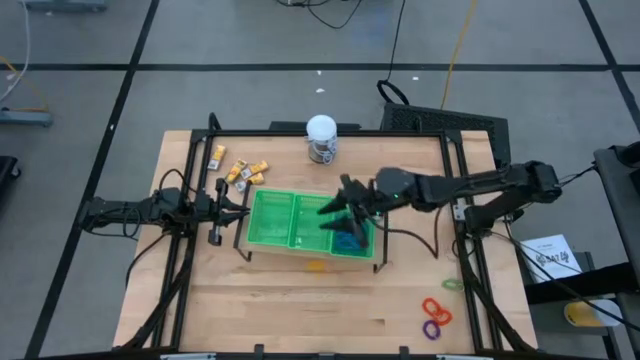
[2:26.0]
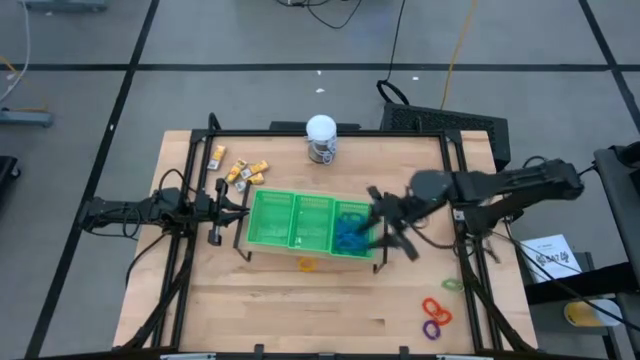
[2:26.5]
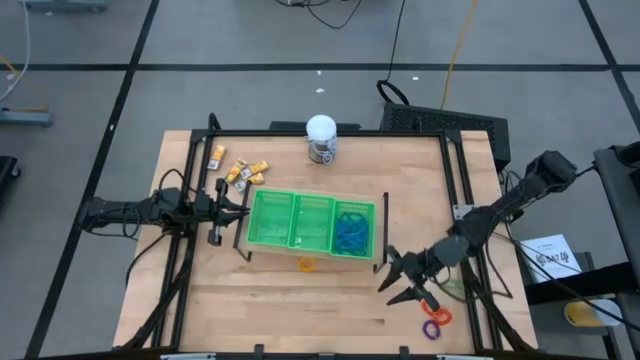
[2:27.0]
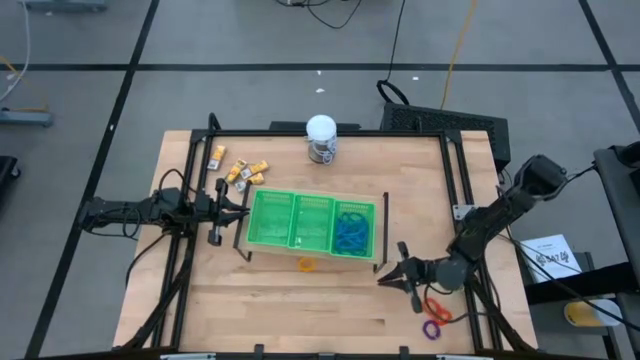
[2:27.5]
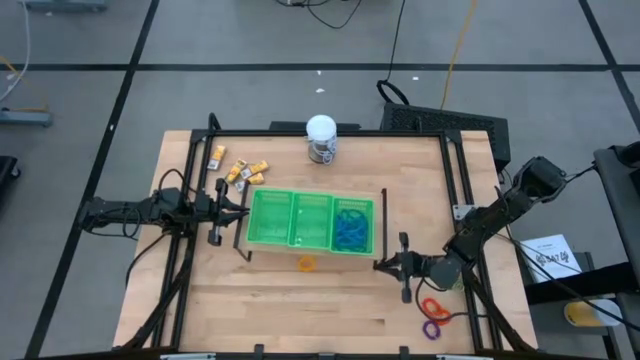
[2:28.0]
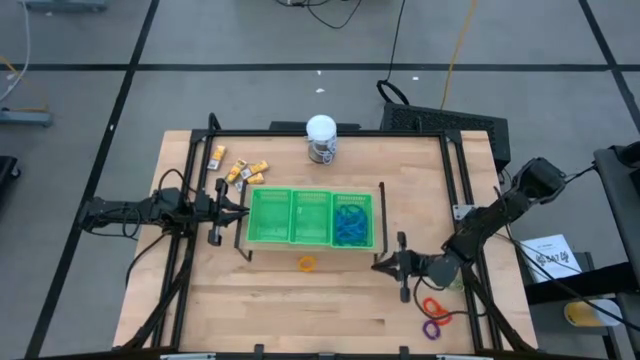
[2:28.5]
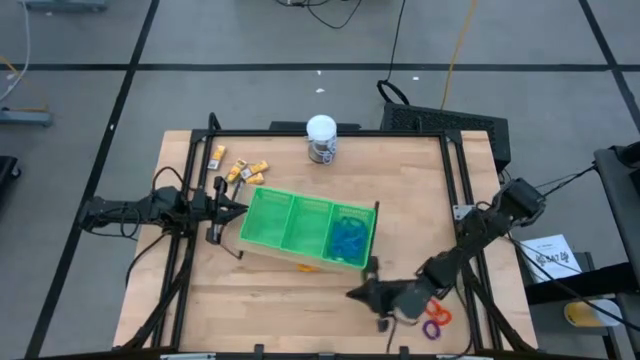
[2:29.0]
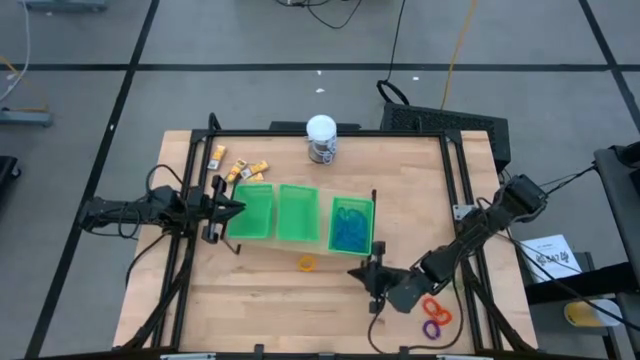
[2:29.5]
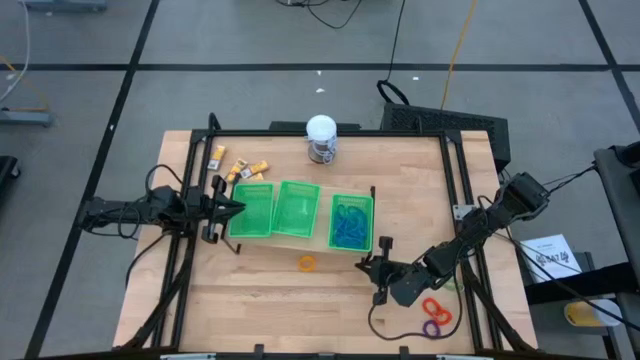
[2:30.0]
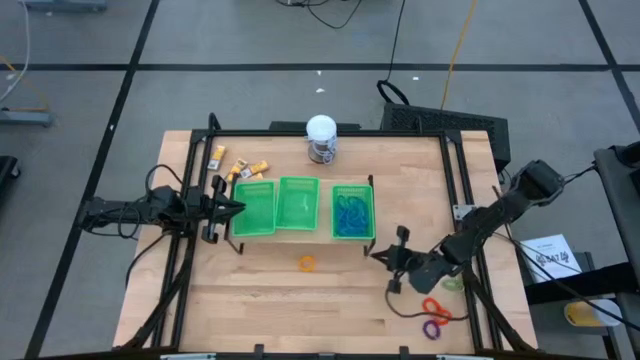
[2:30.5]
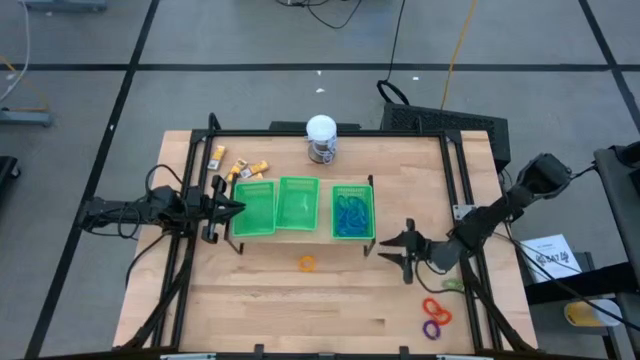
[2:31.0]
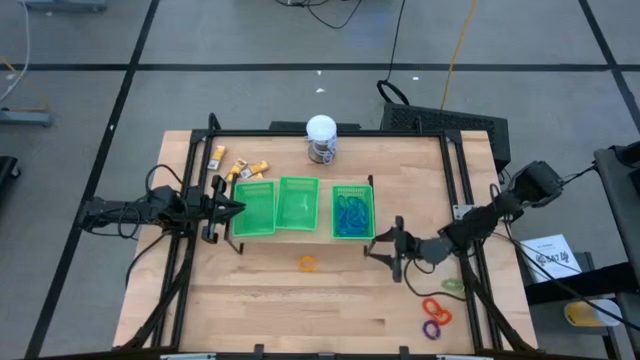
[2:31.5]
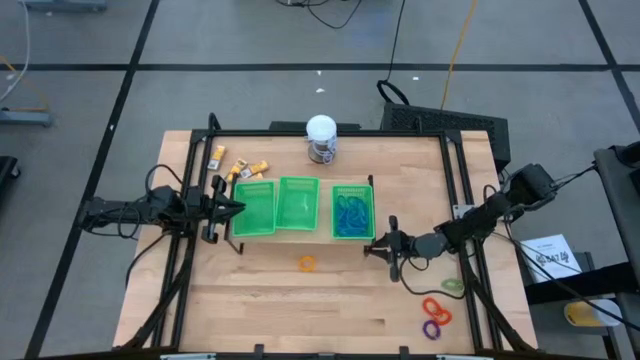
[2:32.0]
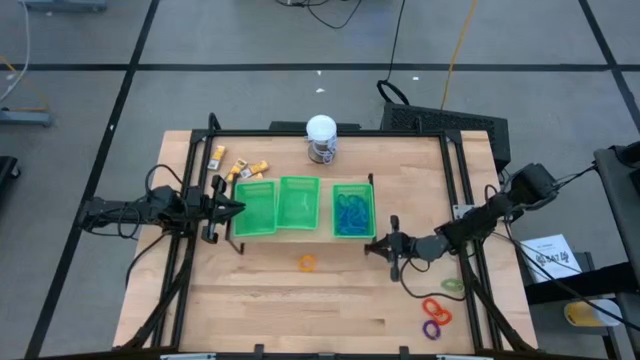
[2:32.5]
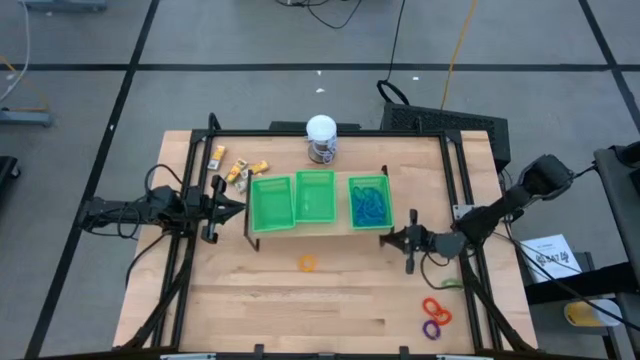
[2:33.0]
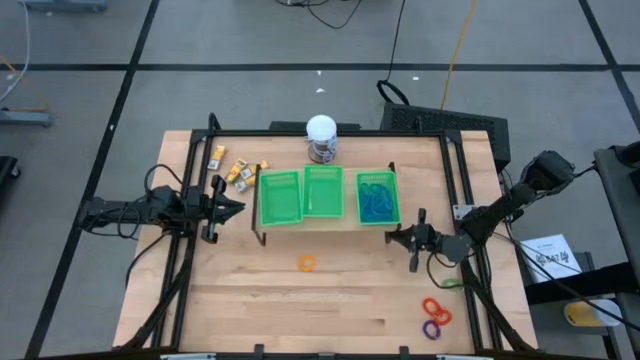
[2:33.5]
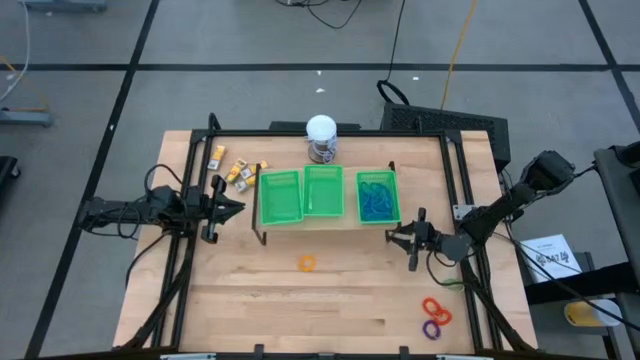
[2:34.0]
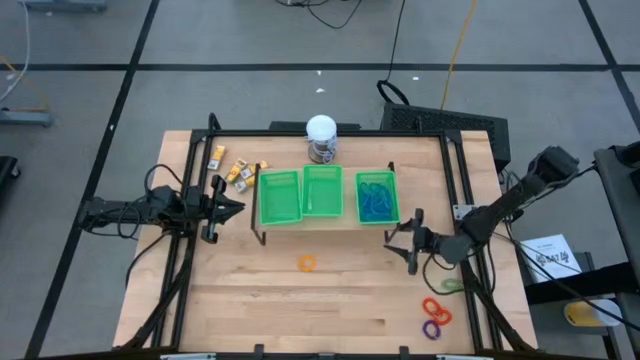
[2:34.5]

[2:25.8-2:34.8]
Task: Pick & Place Office Desk Supplies
Adjust the shelf on the table

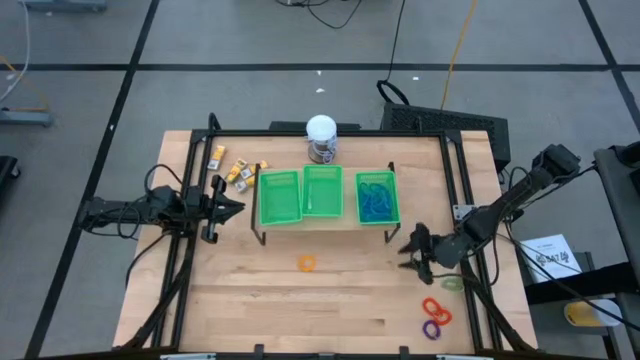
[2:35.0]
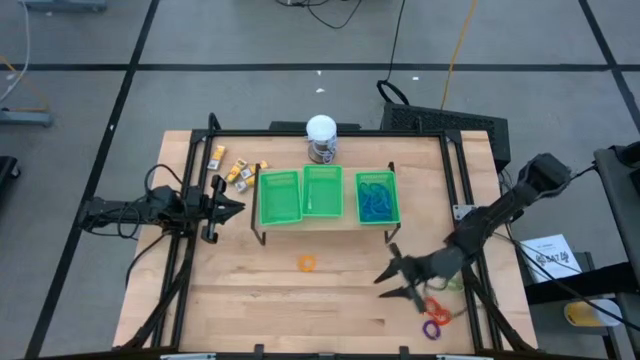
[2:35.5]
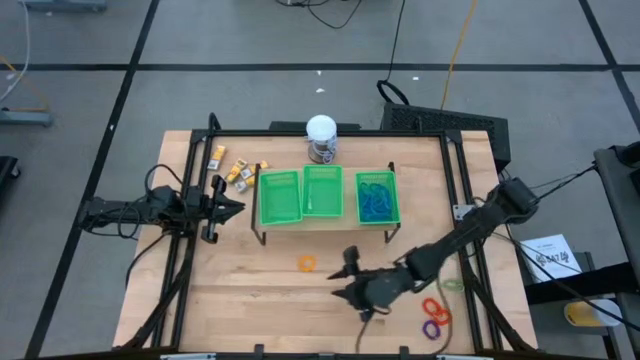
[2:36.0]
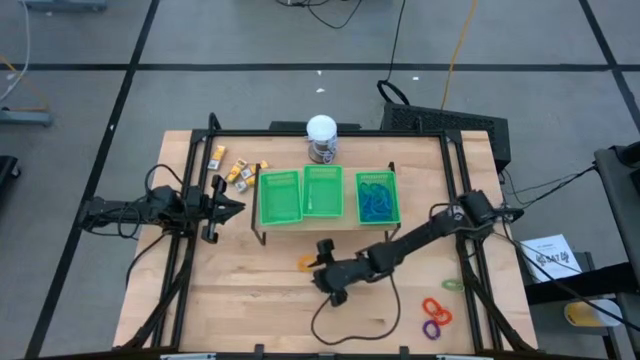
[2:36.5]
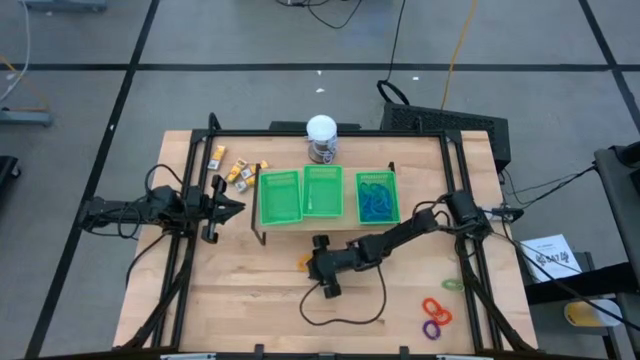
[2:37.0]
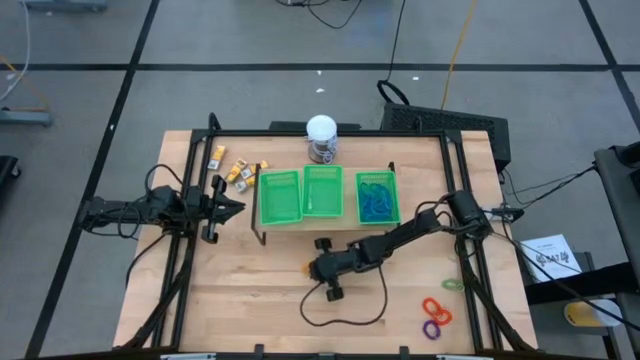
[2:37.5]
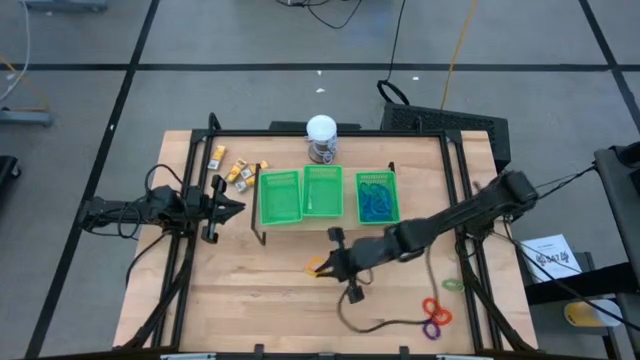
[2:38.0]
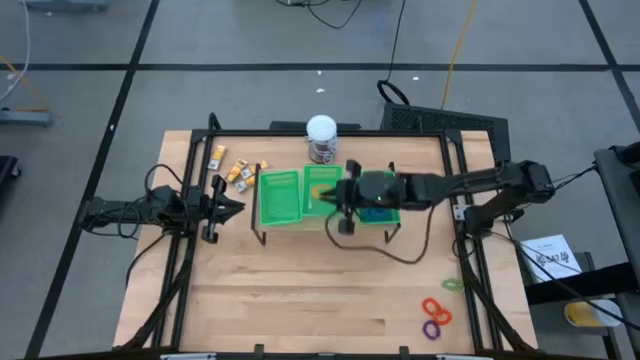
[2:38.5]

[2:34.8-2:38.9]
Put the yellow spring keychain into the center green bin on the shelf

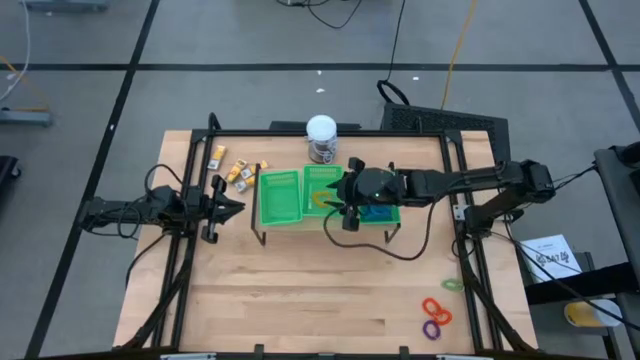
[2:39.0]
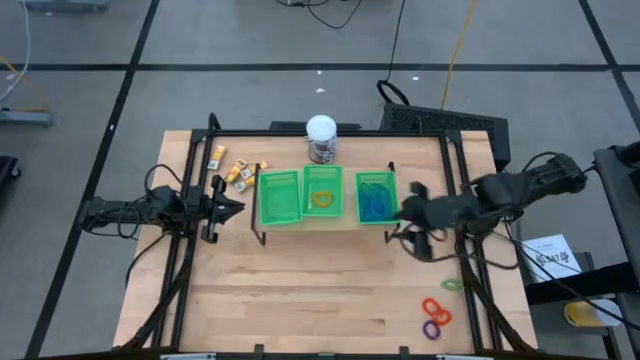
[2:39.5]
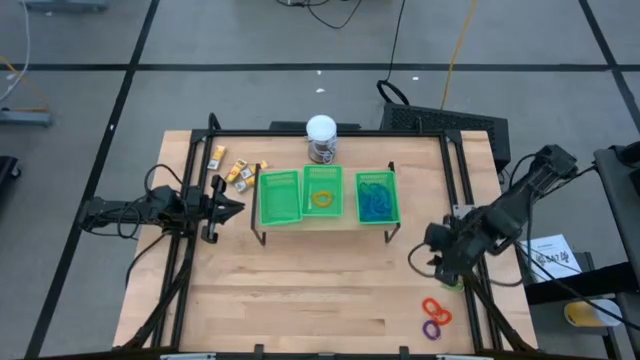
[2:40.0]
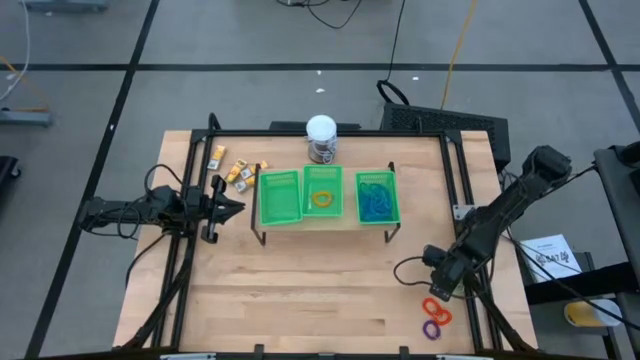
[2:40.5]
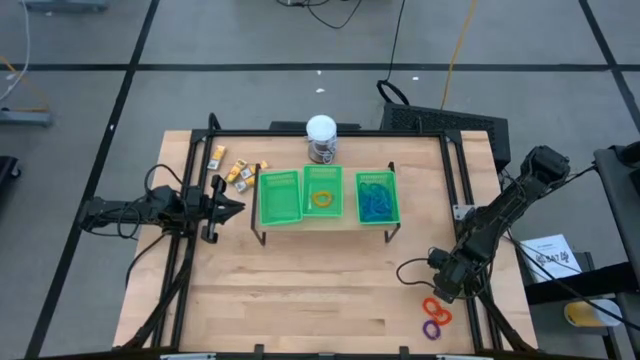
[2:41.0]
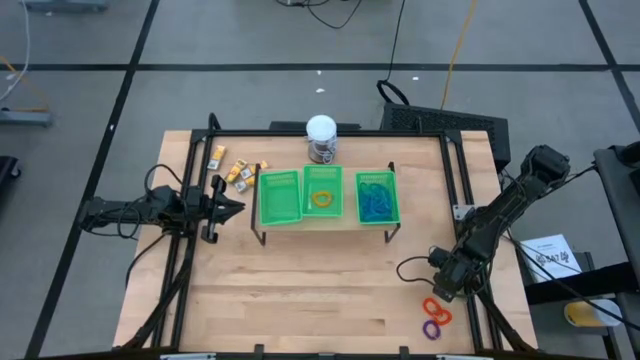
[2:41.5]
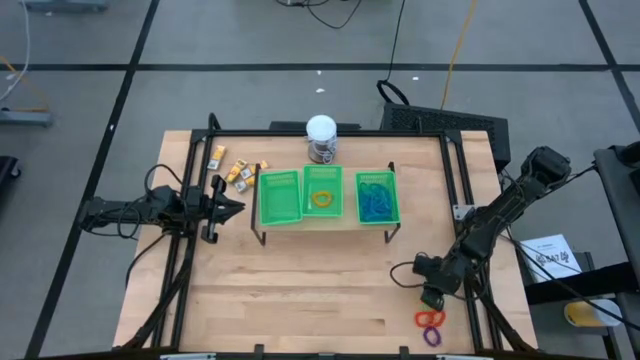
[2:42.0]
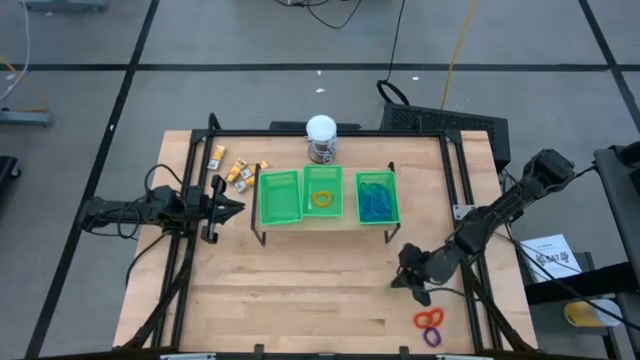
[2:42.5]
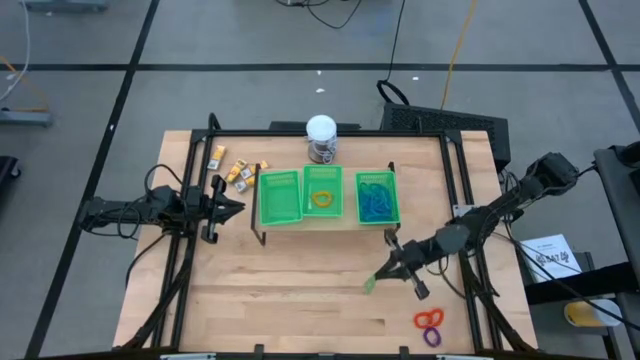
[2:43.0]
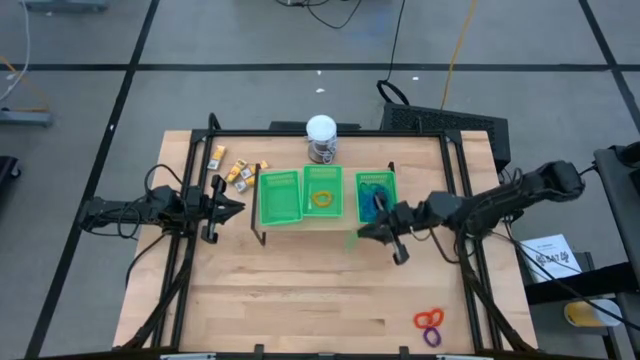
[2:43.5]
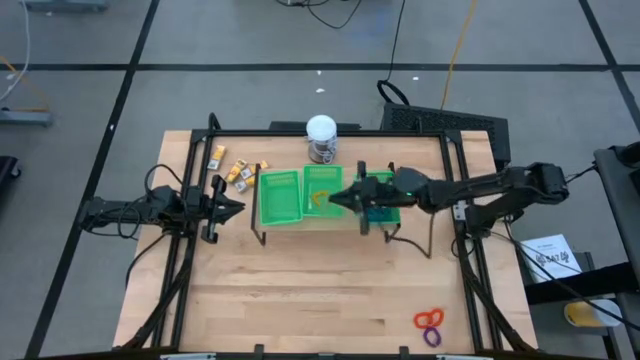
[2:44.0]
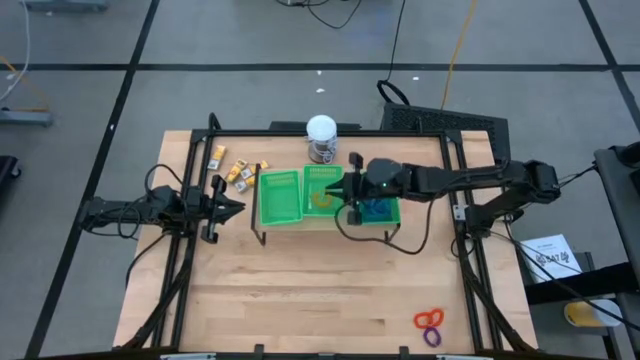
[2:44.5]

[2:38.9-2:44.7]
Put the green spring keychain into the center green bin on the shelf

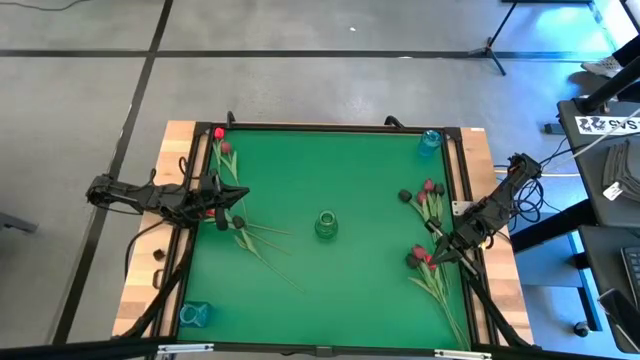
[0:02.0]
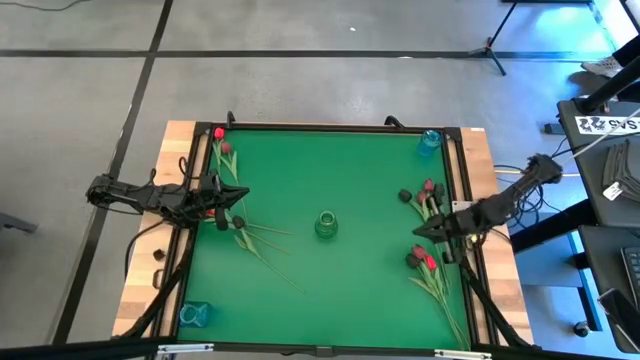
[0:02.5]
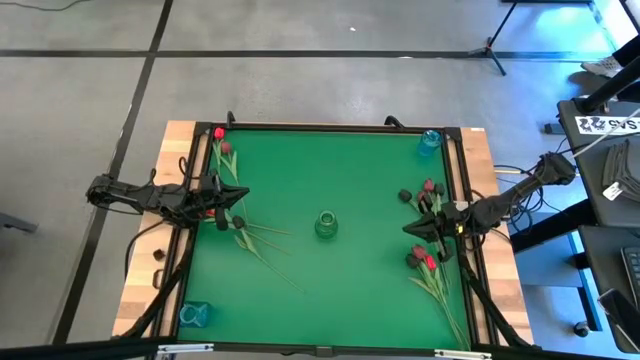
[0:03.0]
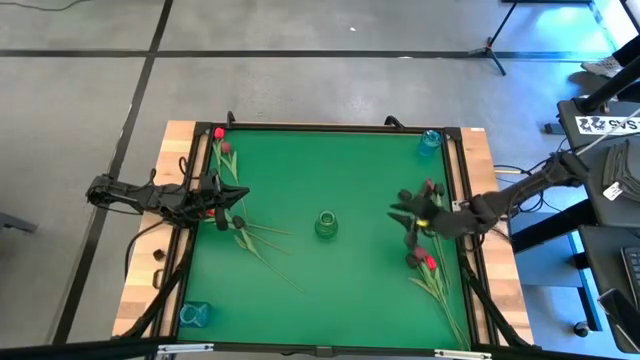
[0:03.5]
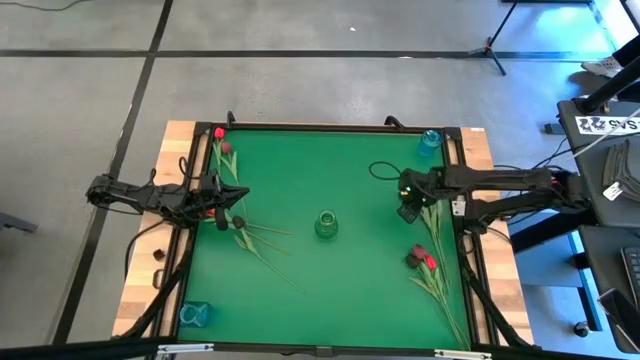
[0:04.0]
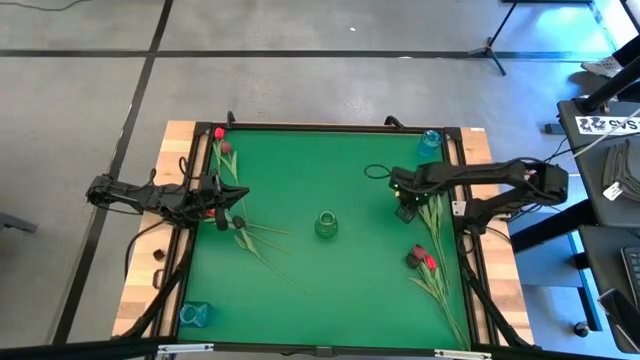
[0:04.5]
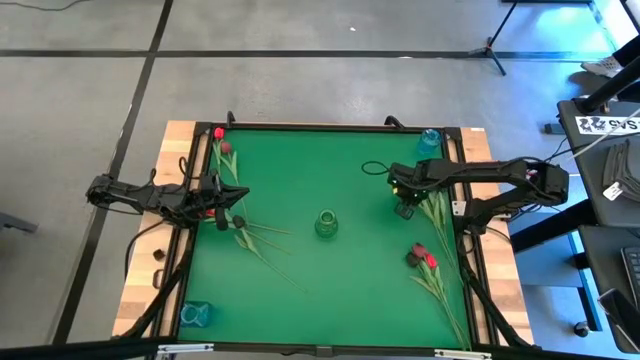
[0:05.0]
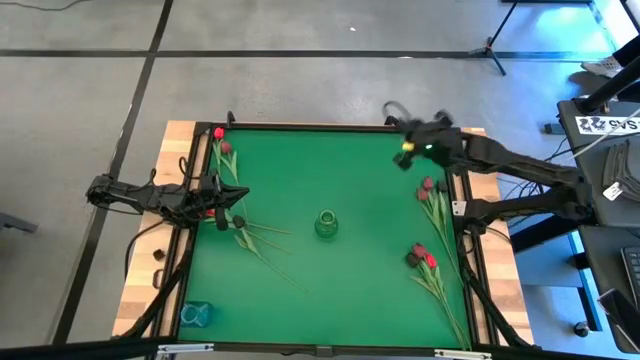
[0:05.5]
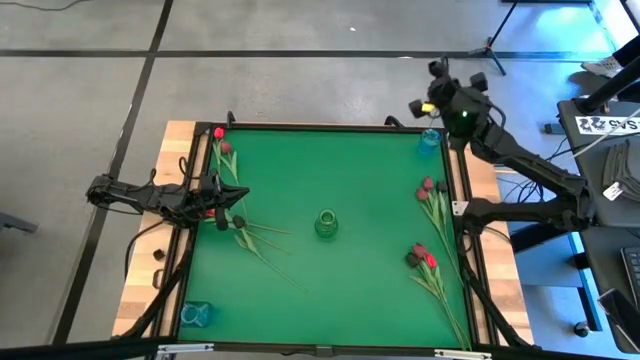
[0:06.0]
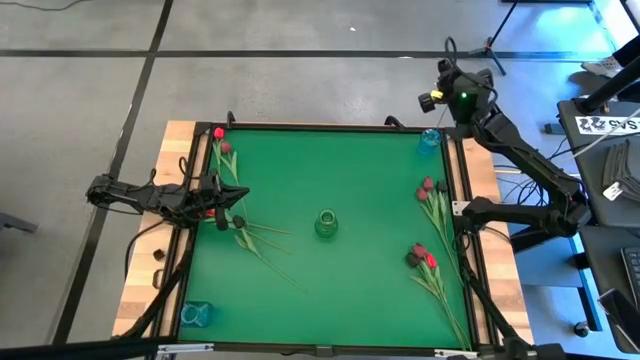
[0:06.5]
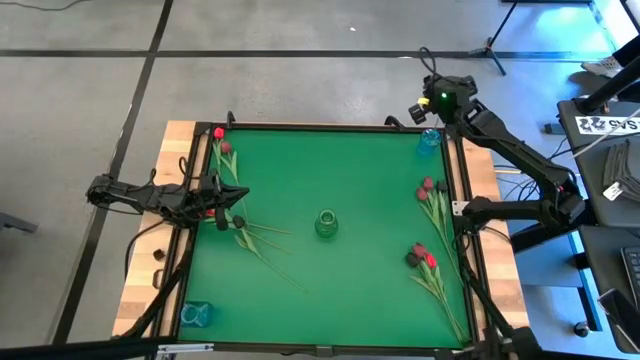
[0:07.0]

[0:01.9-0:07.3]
Task: Sort flowers into vase by color
Put the top middle black flower into the top right blue vase
